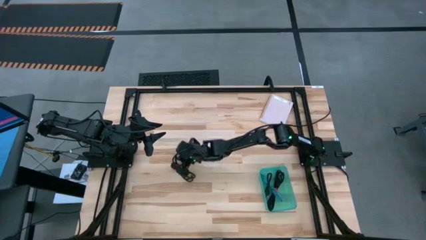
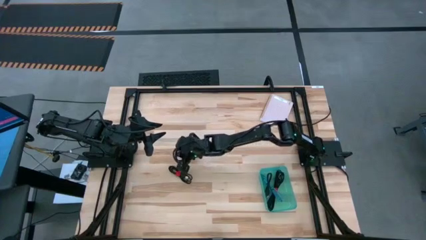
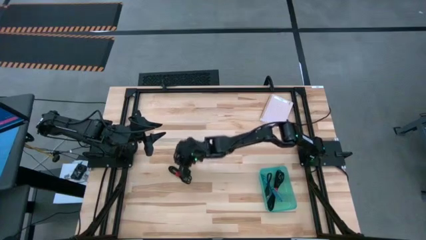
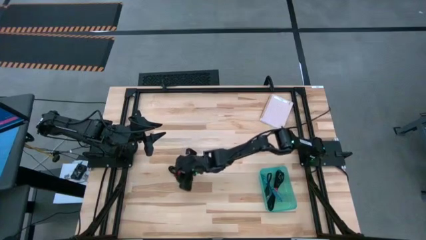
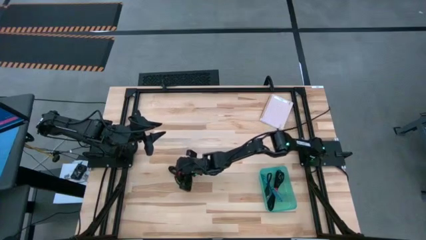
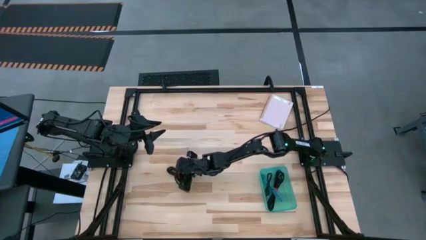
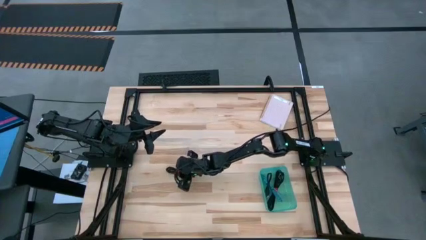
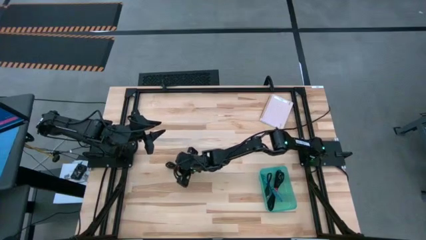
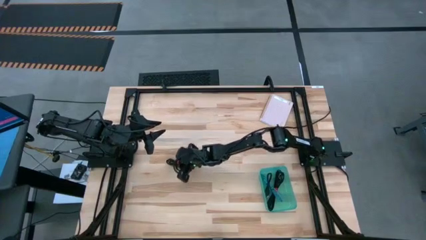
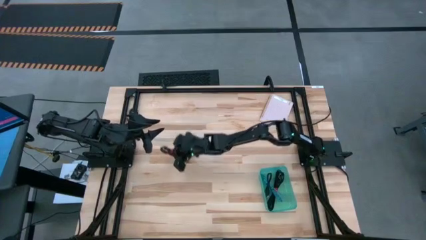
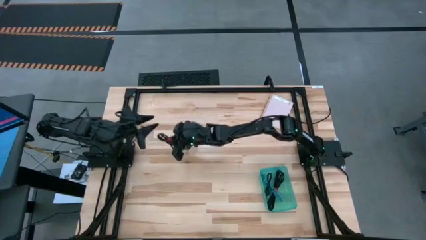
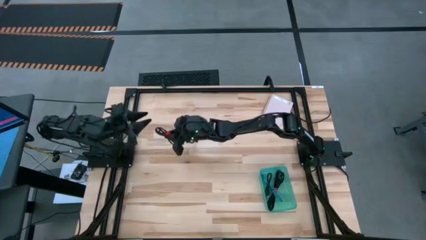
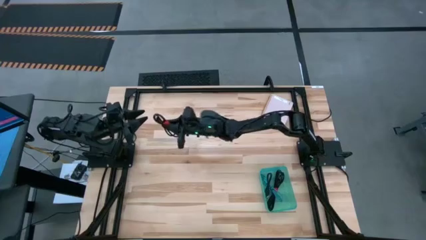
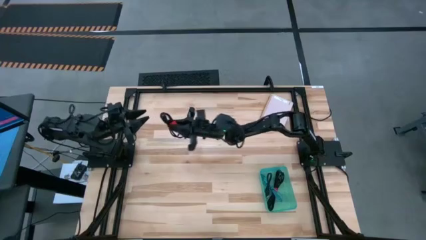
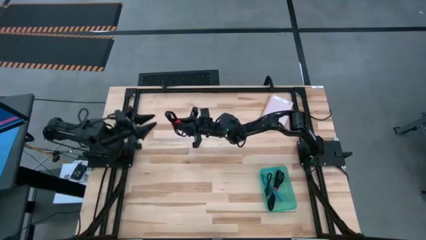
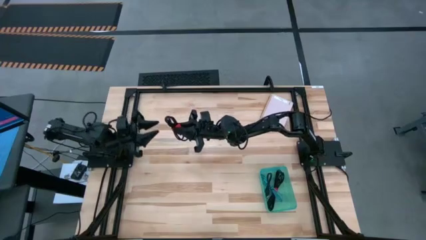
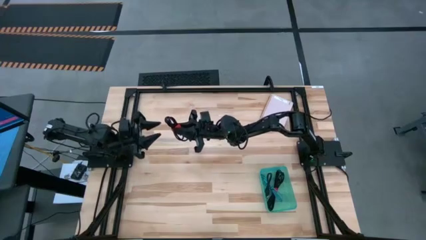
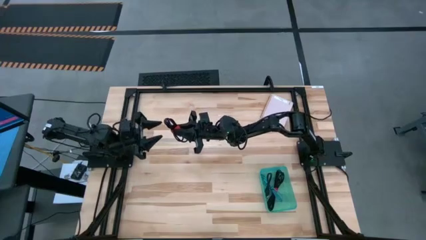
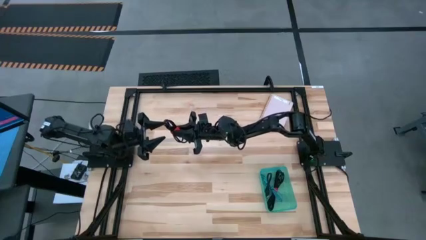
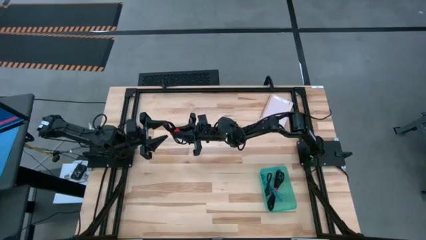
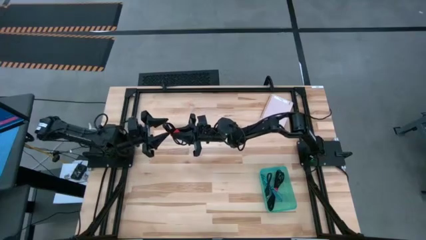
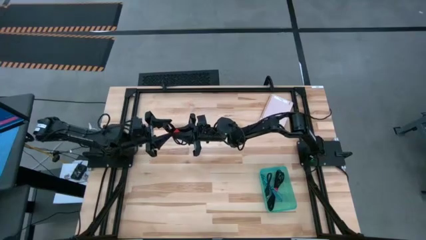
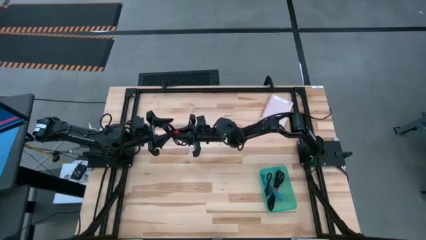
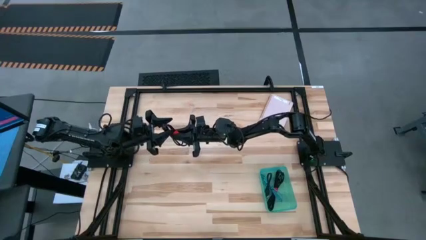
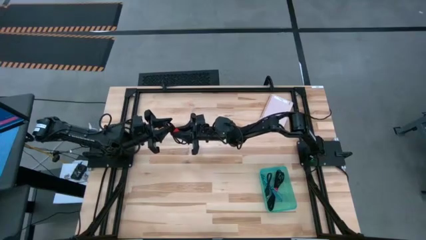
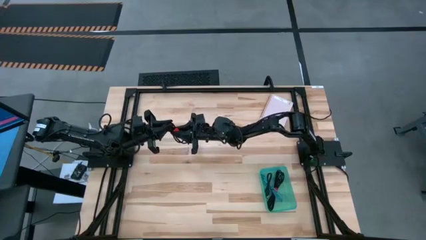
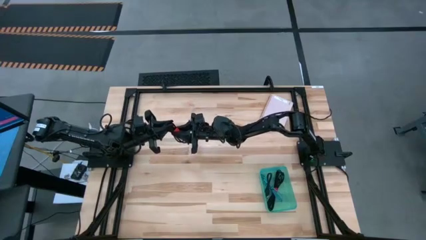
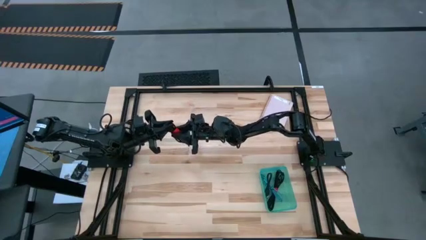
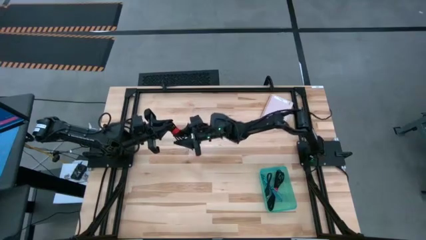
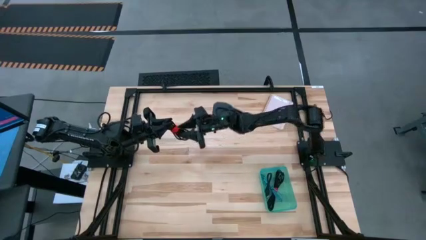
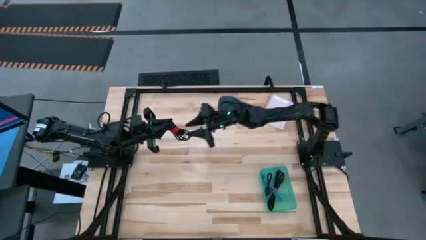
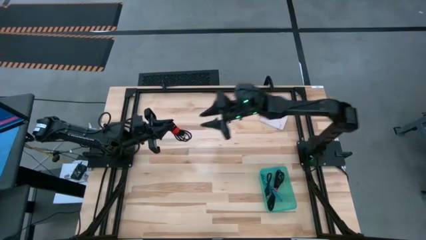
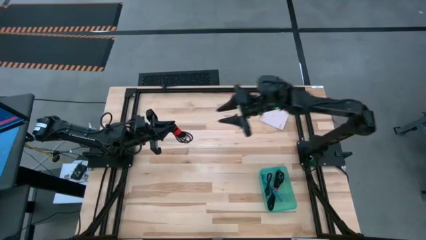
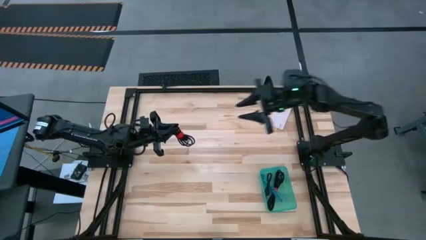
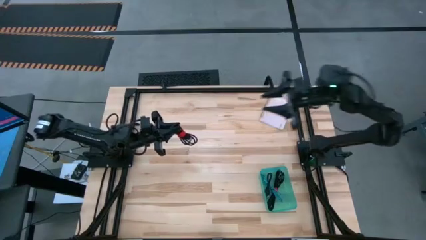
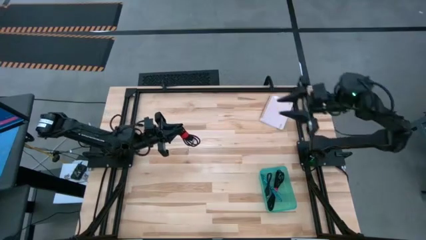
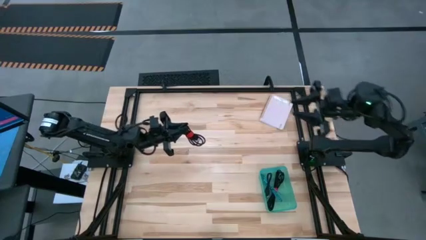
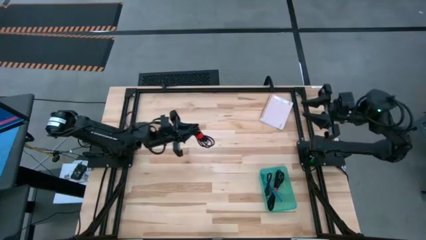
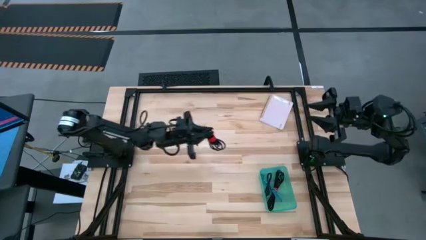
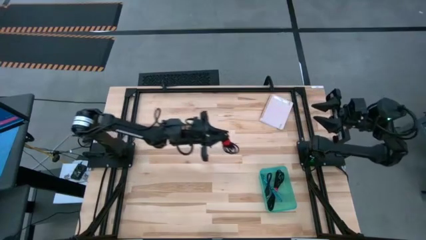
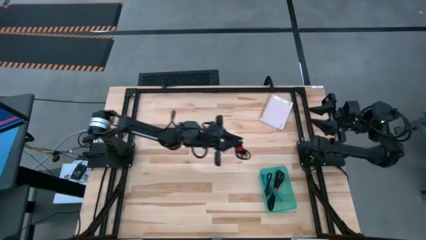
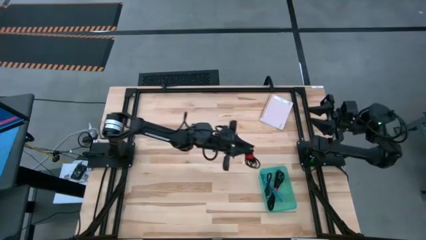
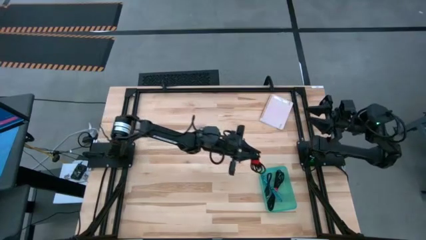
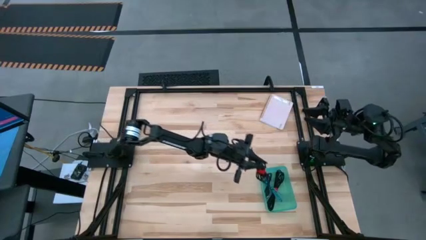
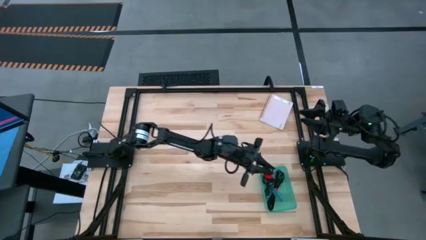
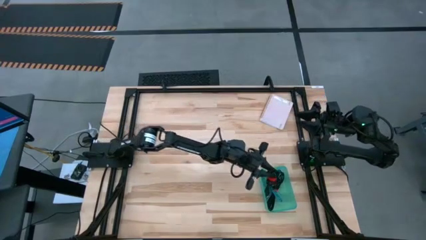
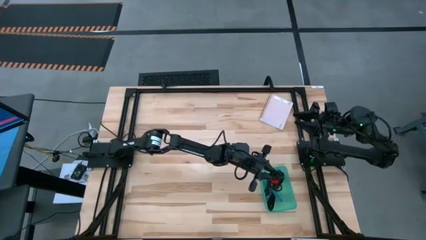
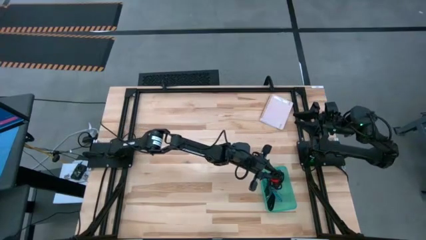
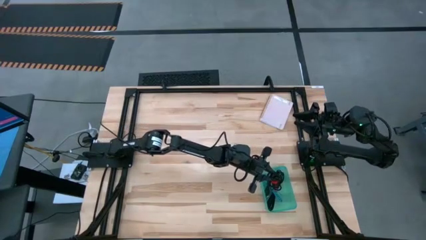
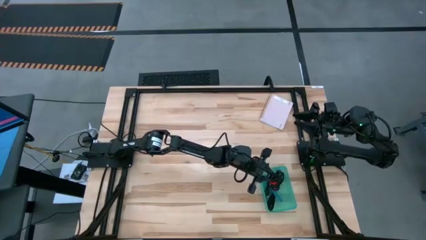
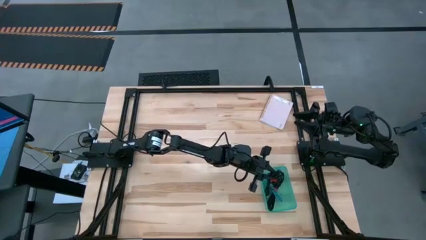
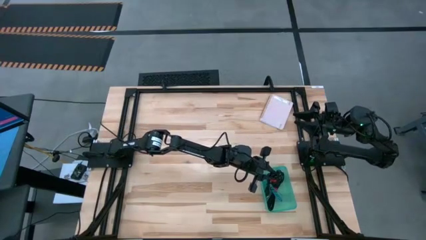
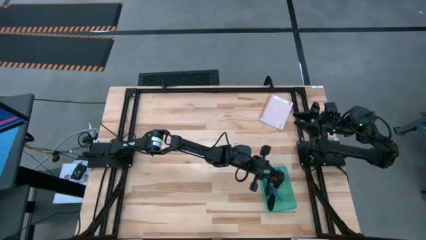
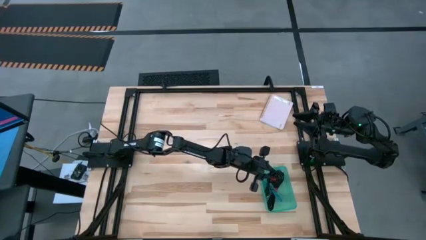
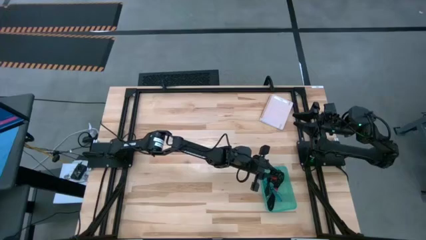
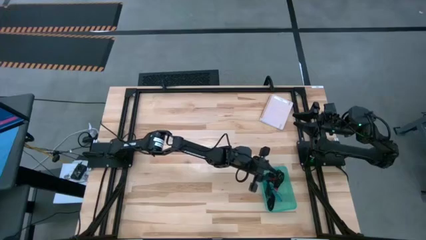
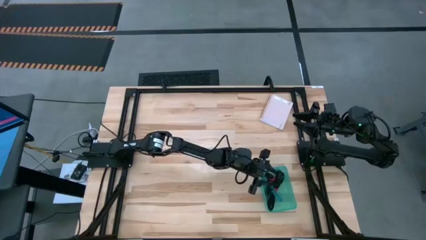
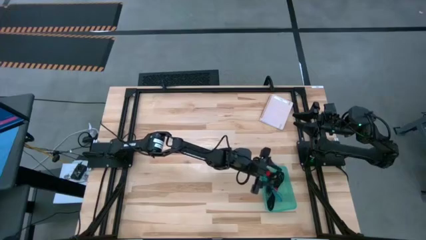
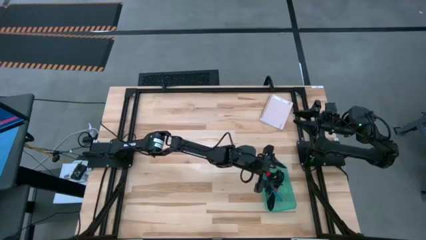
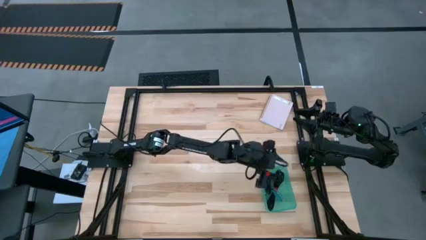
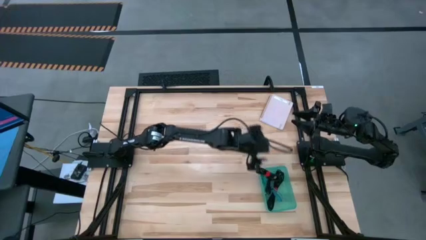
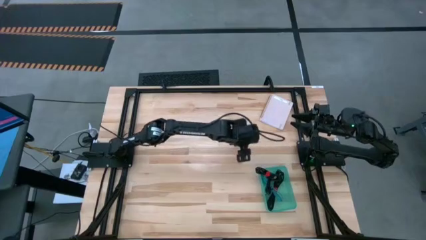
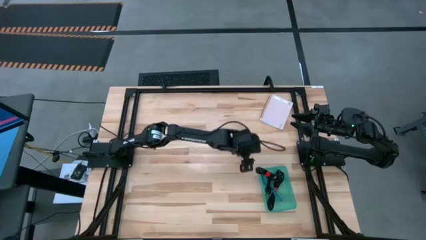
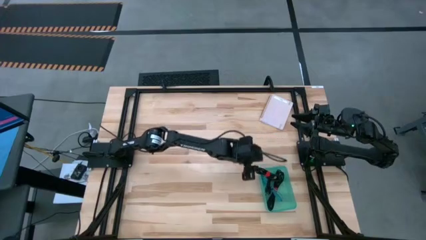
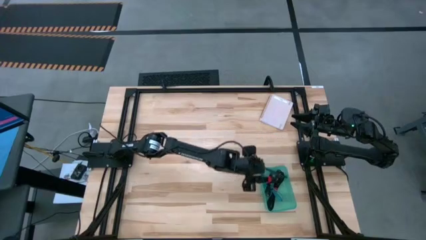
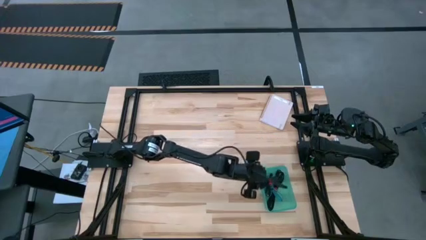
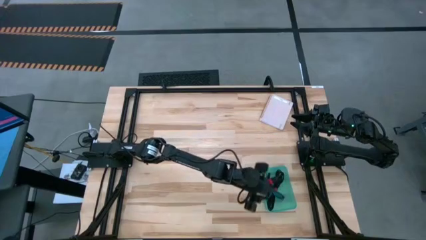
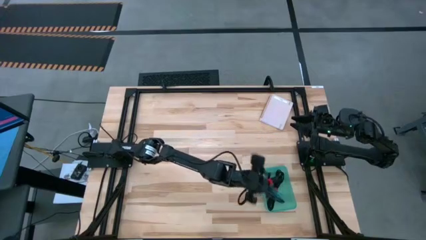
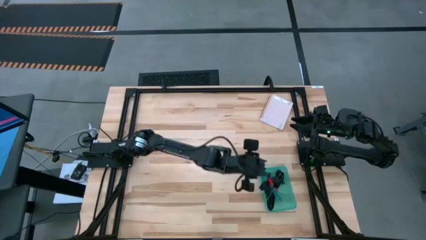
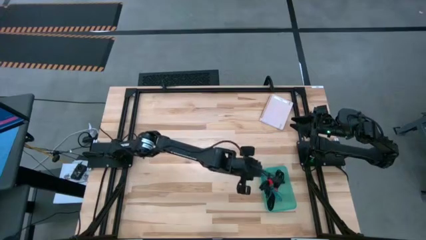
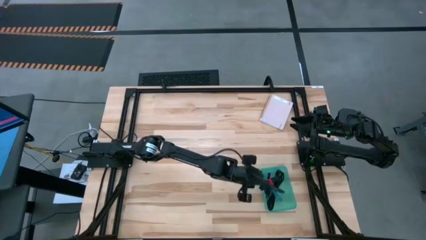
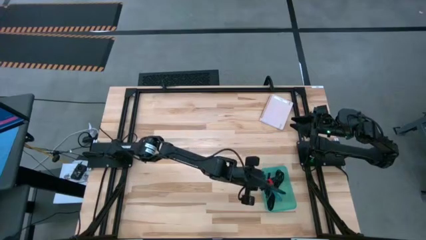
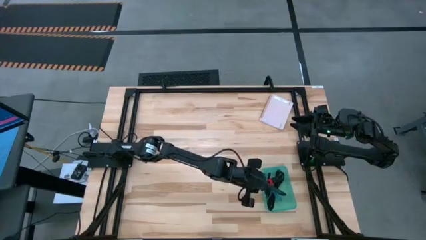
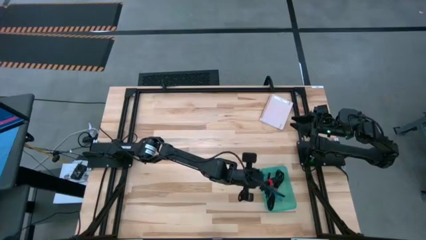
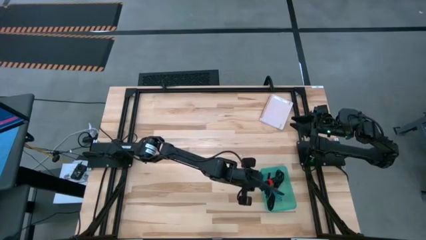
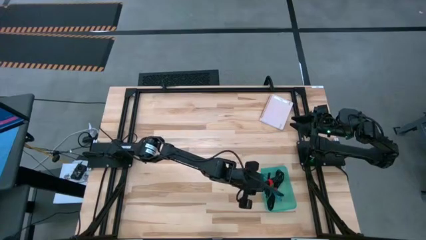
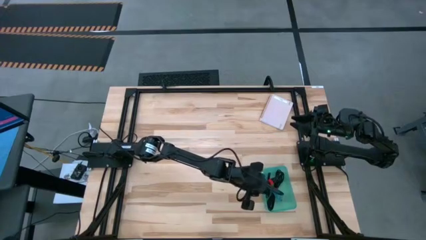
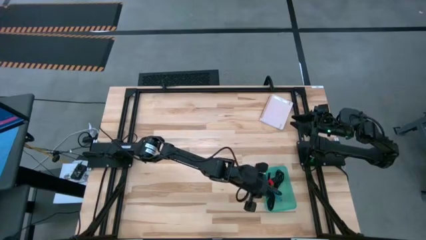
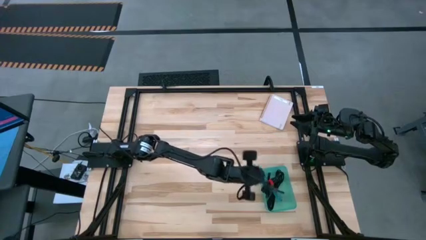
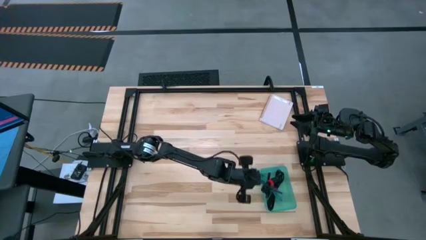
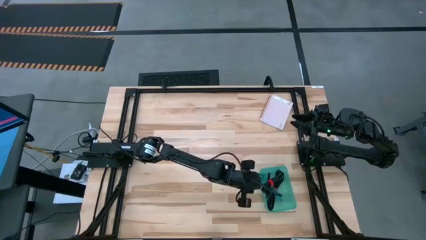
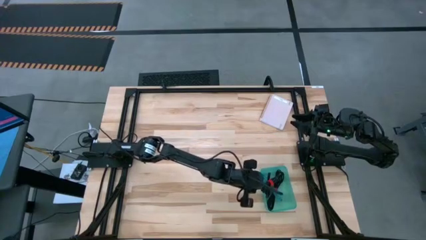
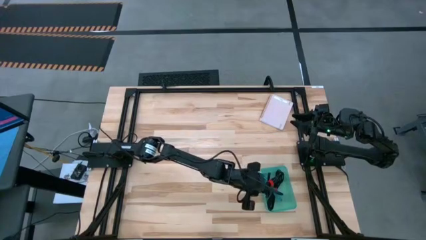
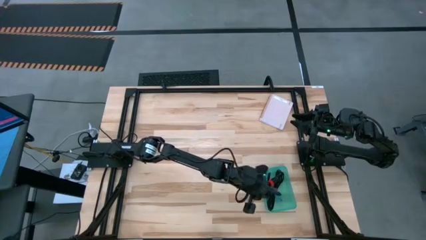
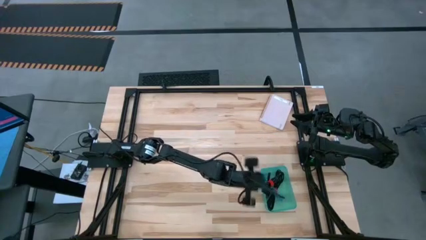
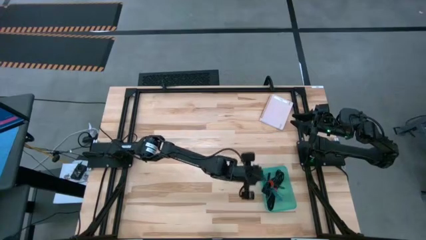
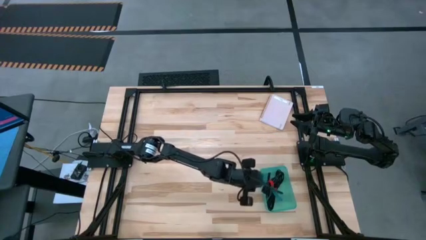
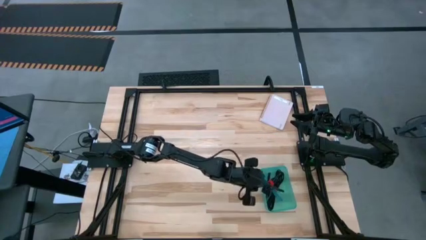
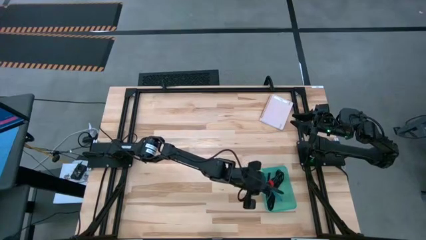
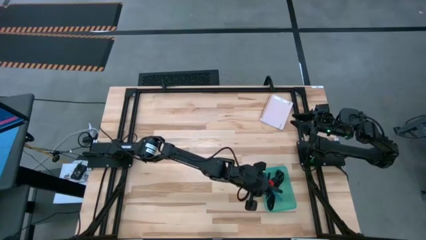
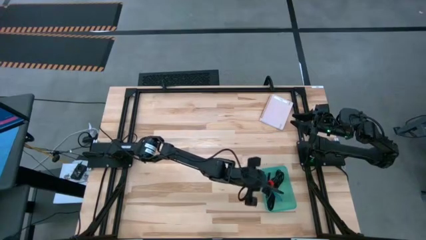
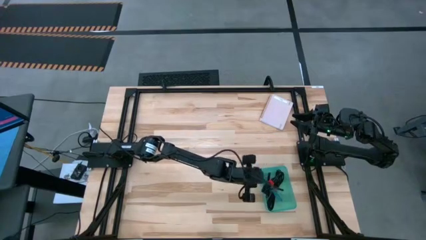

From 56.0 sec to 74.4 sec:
Task: Pick and place USB-C Cables
Put the black charger cable into the green bin
